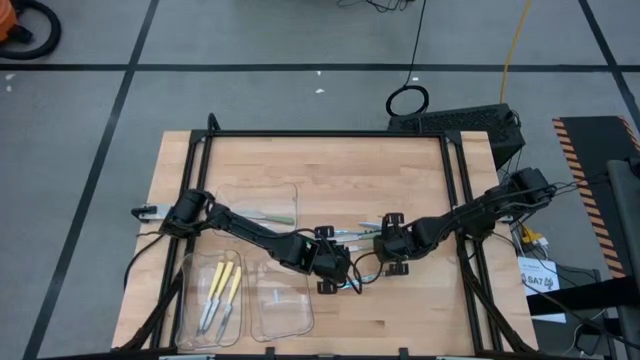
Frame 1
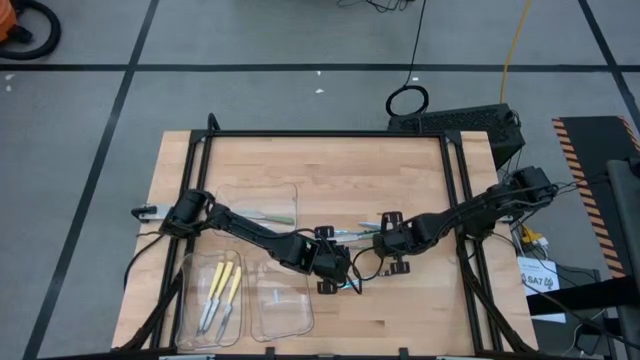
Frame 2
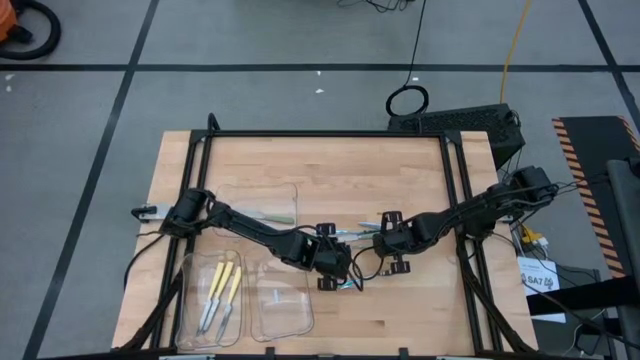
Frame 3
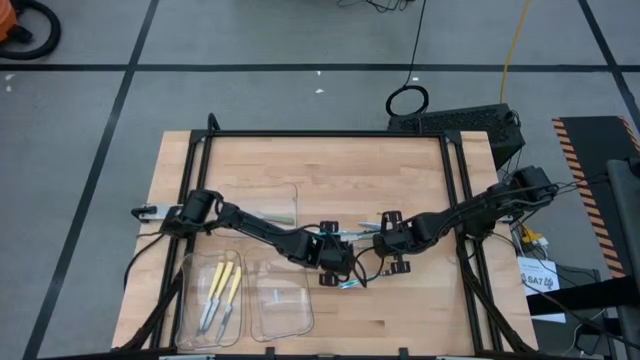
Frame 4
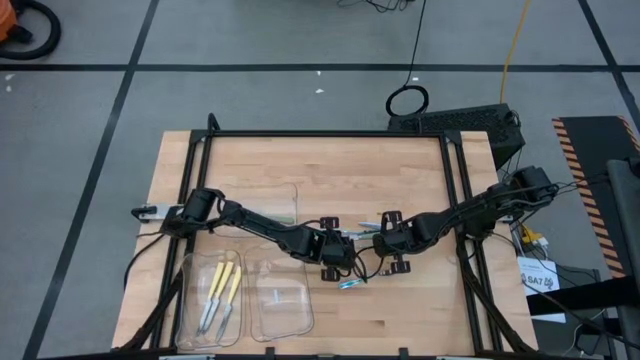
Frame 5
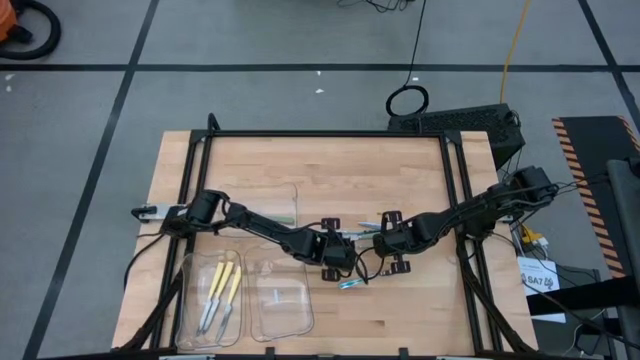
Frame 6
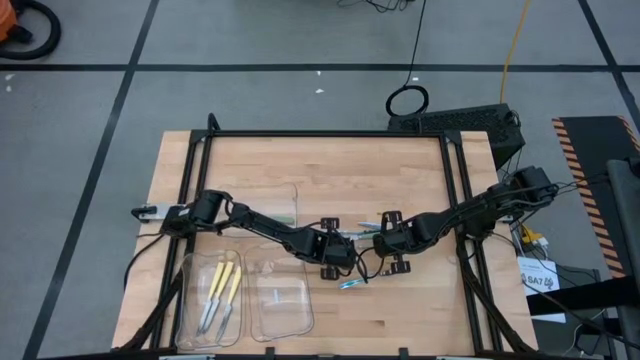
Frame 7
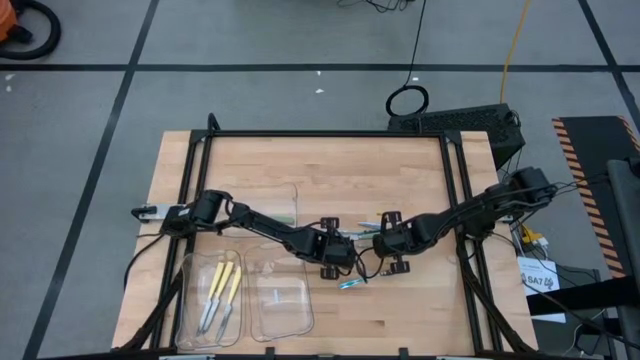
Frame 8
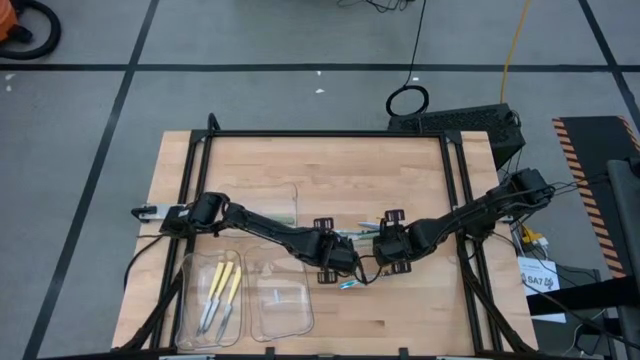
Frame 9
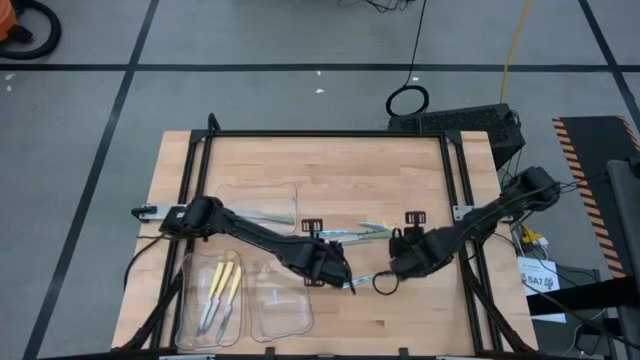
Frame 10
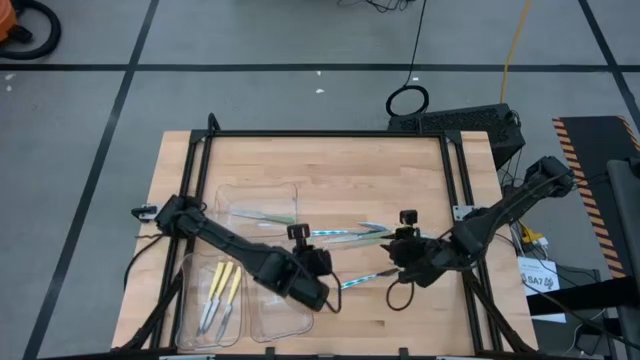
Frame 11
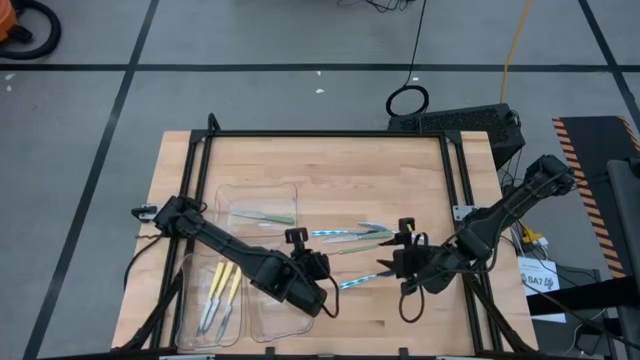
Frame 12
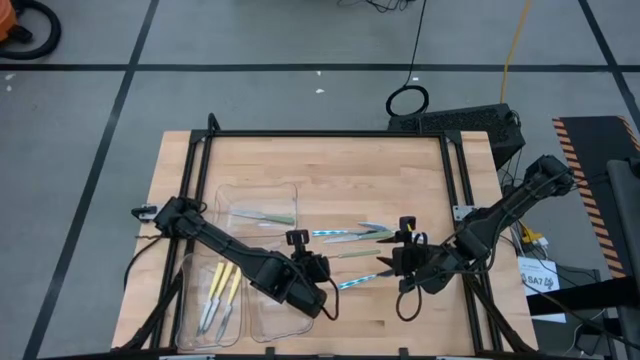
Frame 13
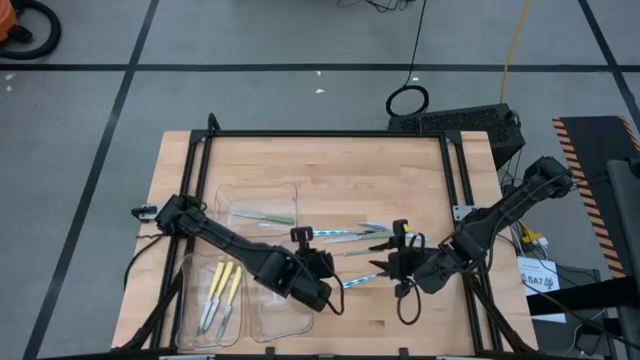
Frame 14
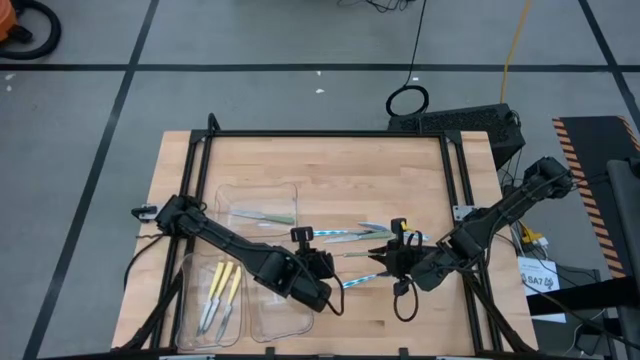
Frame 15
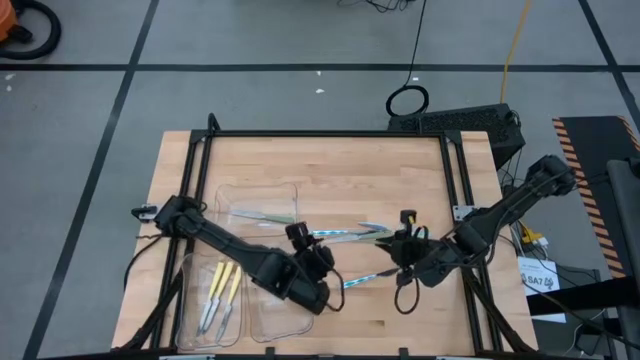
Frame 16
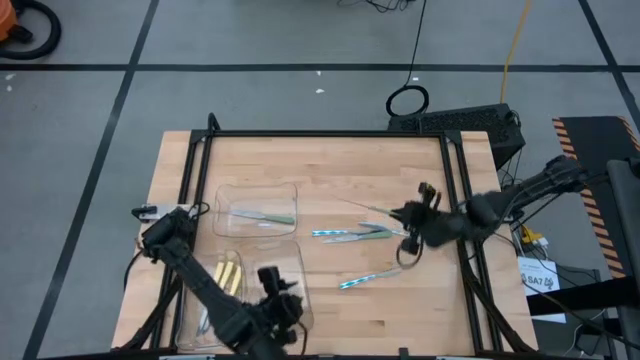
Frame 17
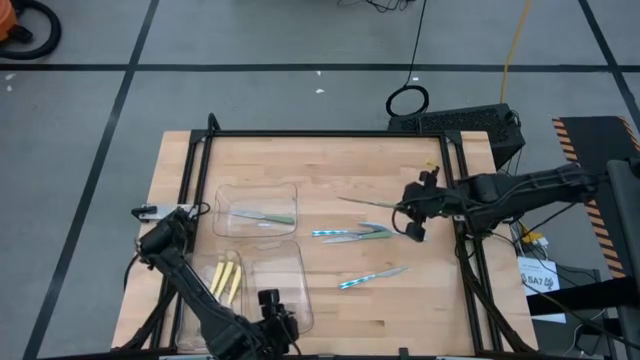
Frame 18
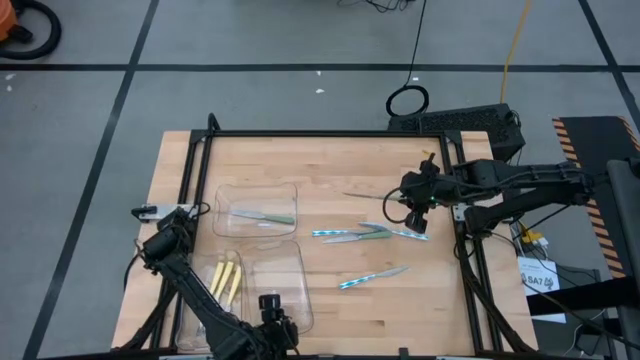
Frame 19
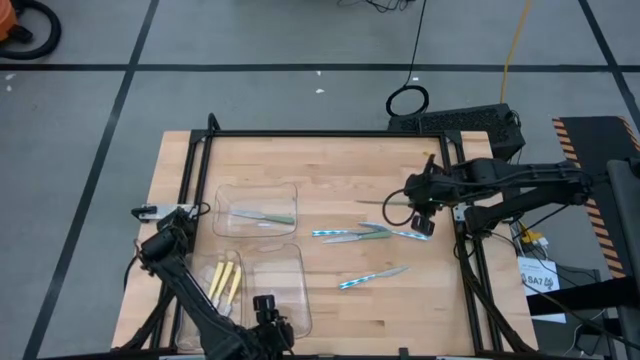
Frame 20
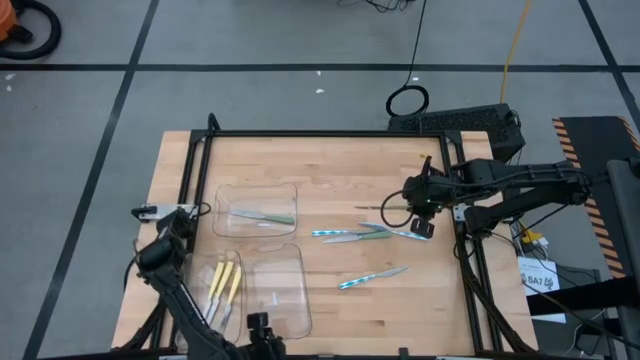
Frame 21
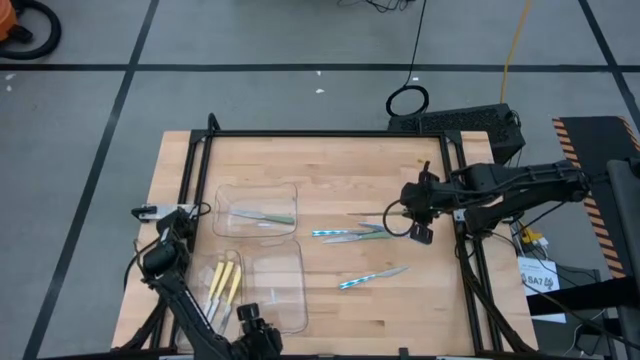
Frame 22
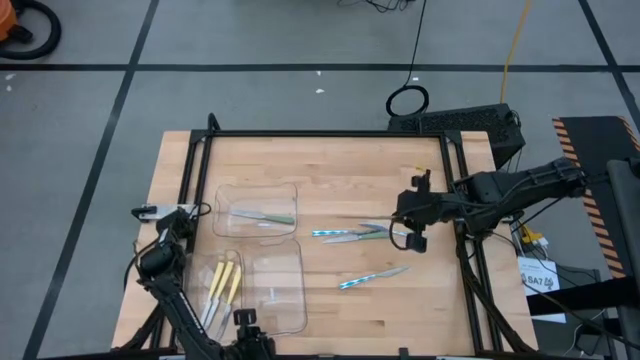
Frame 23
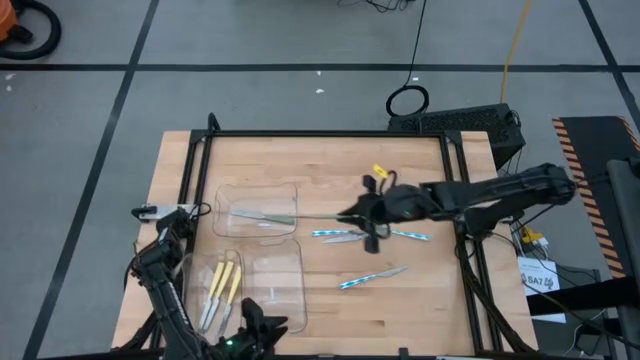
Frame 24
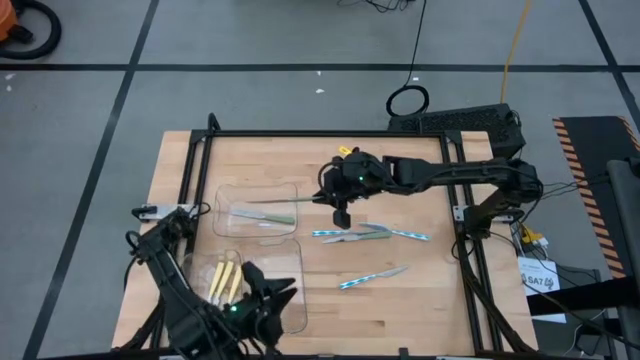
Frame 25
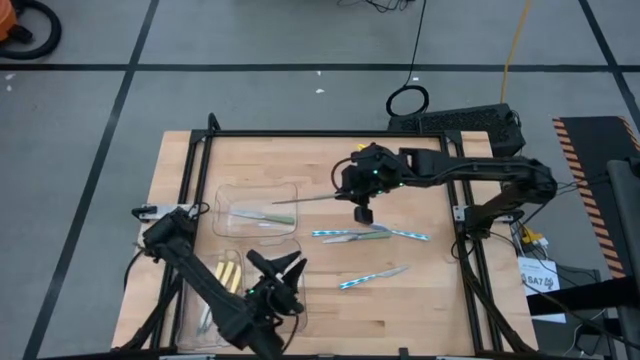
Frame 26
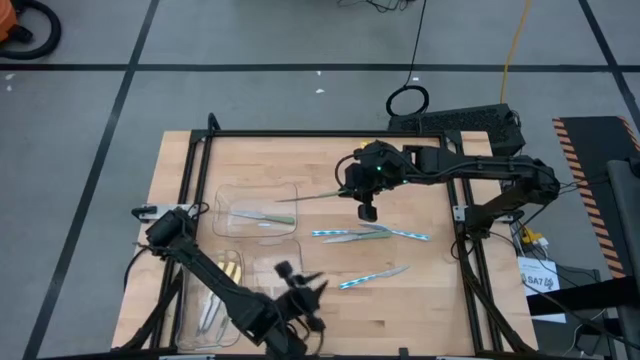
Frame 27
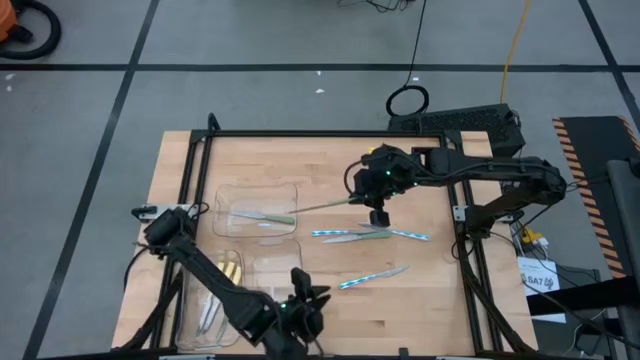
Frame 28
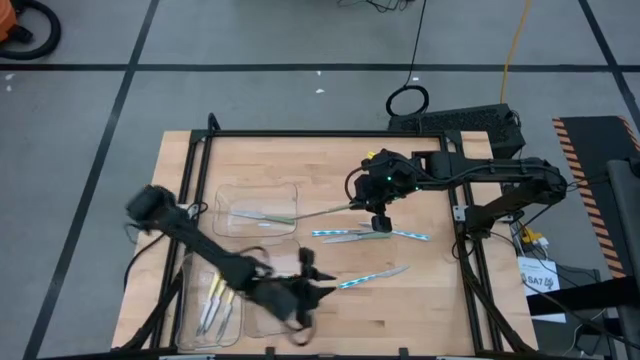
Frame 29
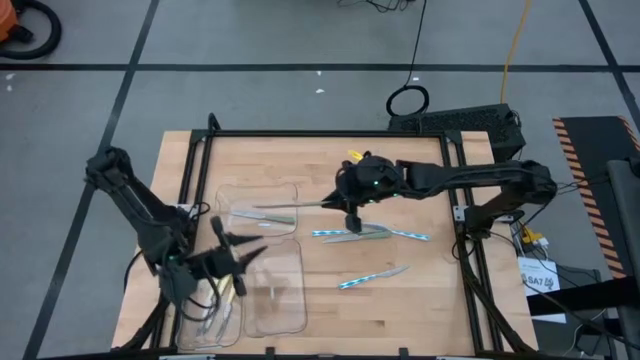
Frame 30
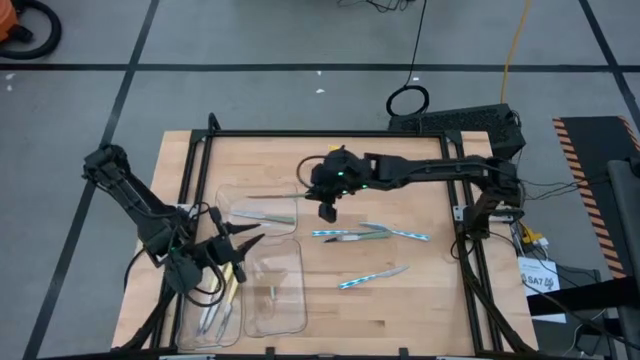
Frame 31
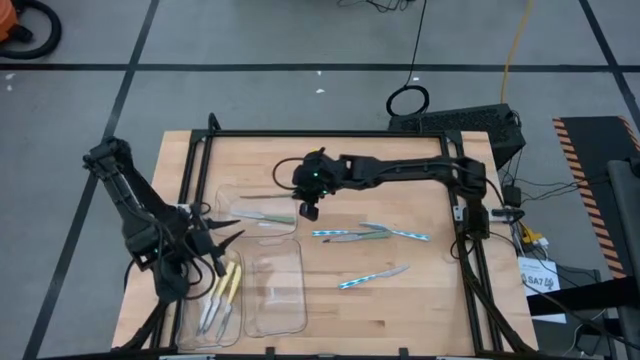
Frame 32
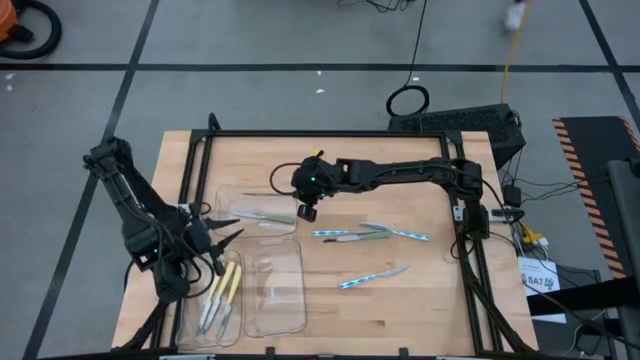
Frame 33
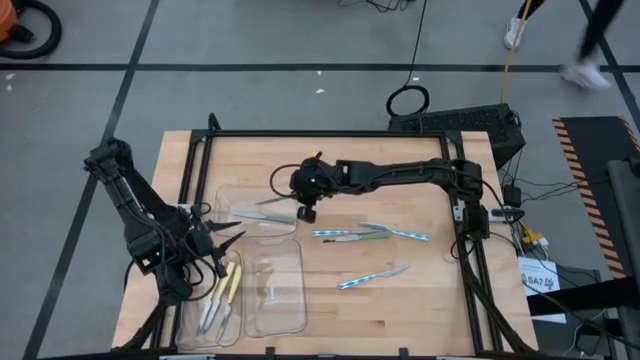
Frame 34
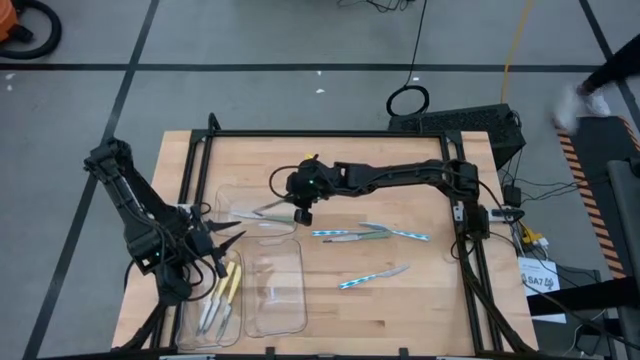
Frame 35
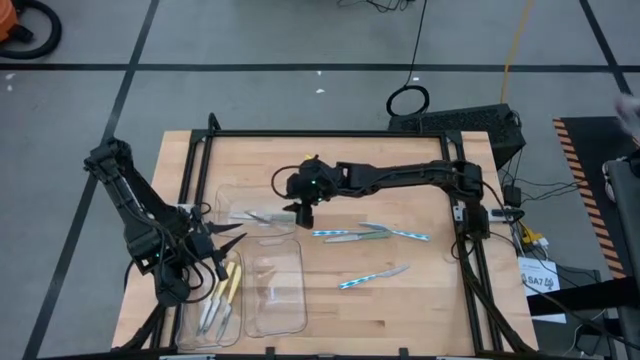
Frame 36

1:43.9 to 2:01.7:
Task: Sort silverware by color (type)
Put the bottom green table knife into the top transparent bin

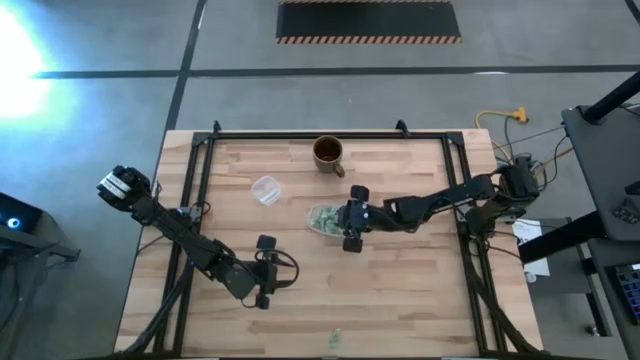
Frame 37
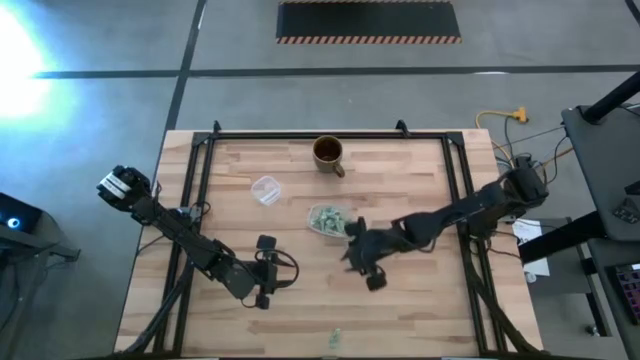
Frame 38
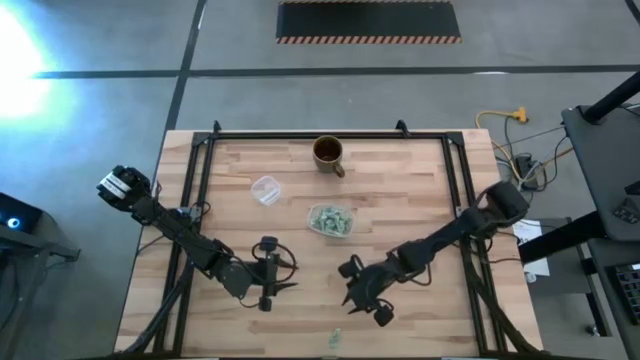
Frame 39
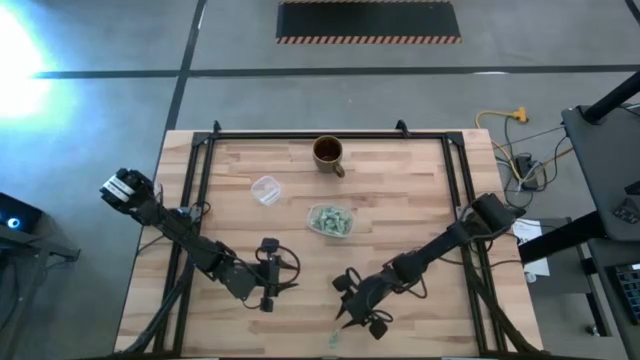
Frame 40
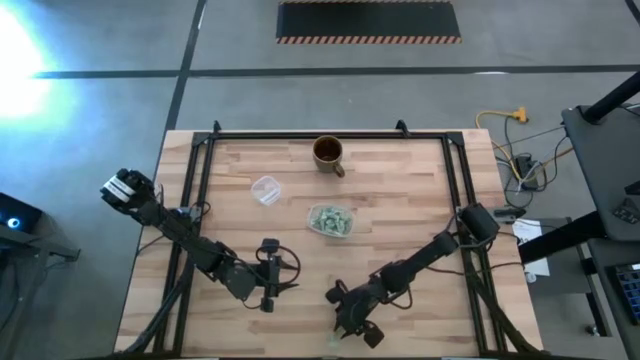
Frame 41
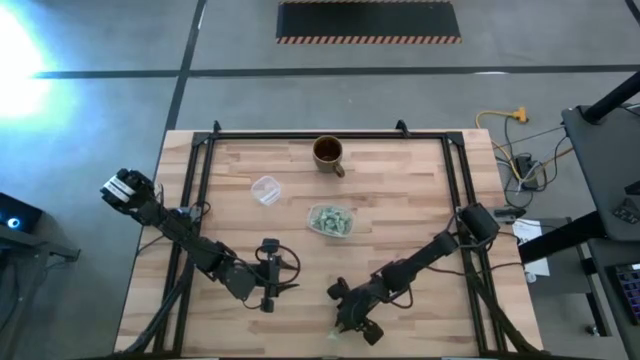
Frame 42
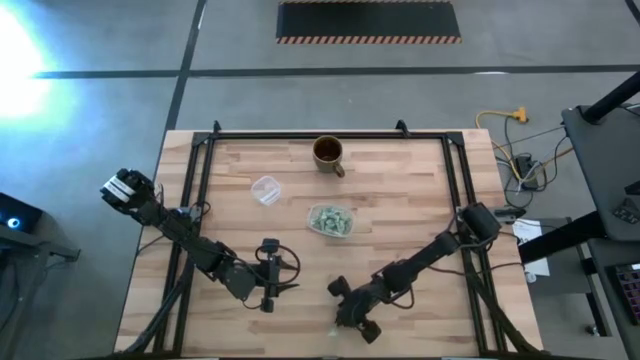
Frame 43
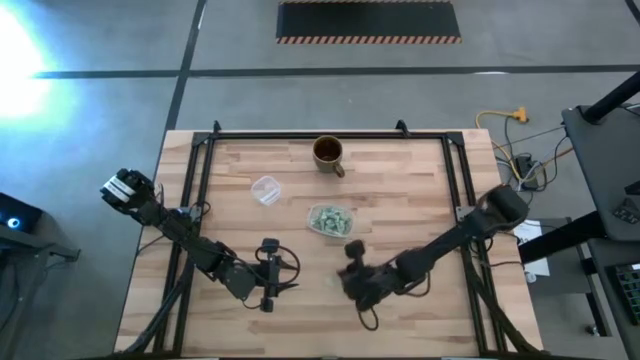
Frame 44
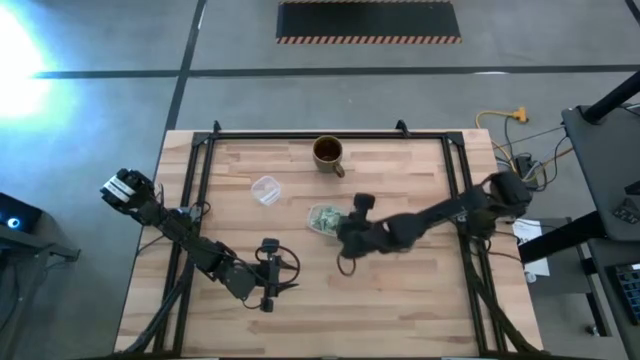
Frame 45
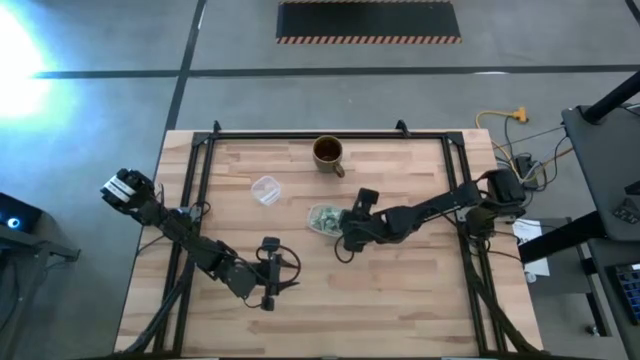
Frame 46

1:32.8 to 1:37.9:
Task: Pick and place Stevia / Truvia into bins
Put the green stevia packet into the transparent container
